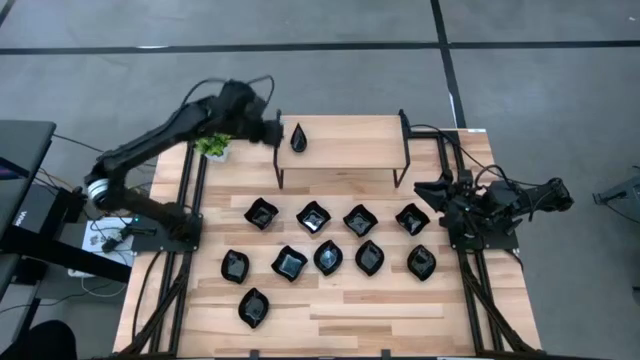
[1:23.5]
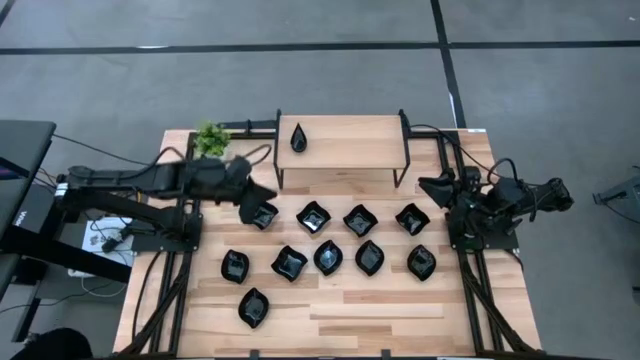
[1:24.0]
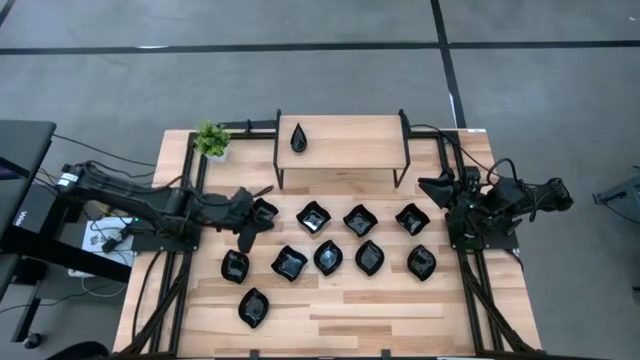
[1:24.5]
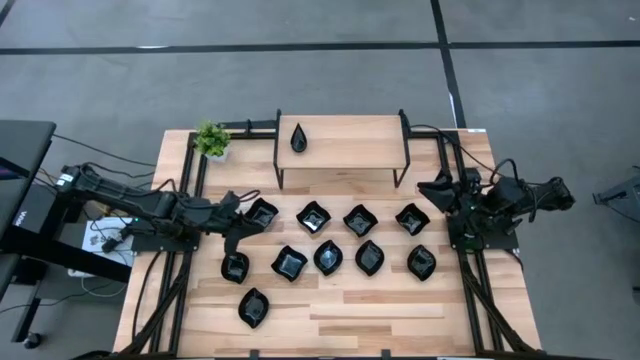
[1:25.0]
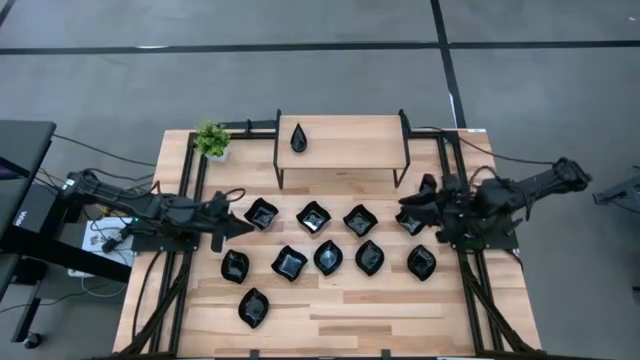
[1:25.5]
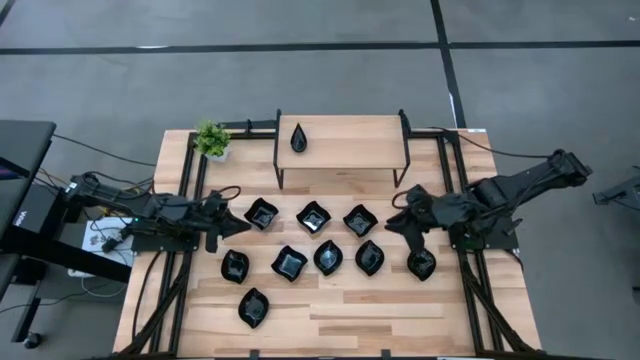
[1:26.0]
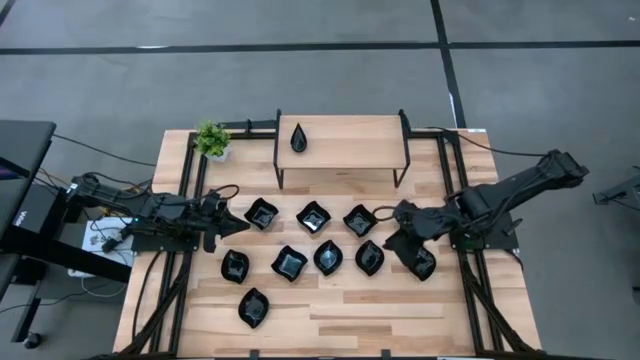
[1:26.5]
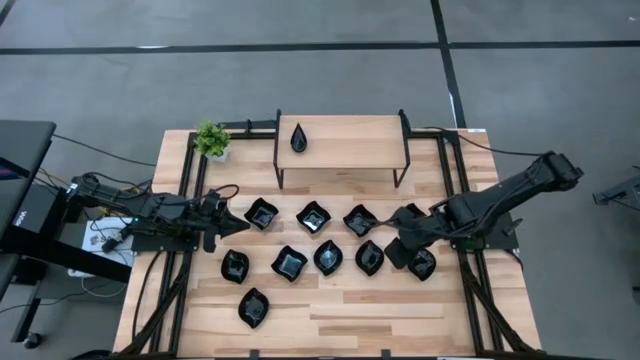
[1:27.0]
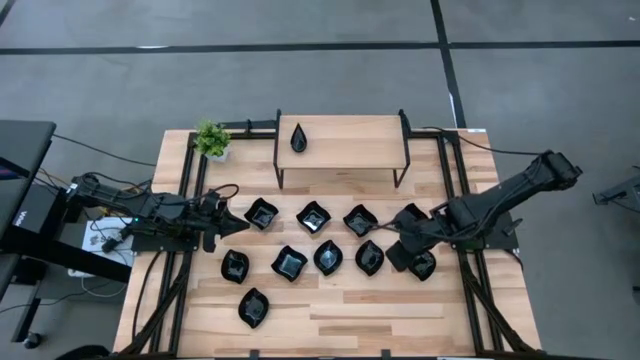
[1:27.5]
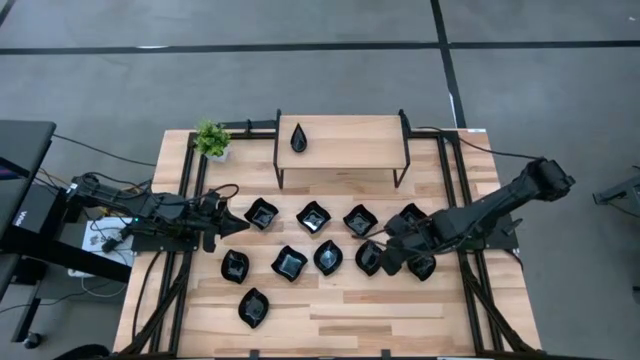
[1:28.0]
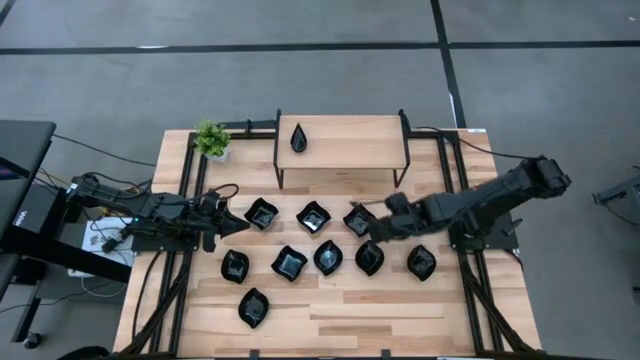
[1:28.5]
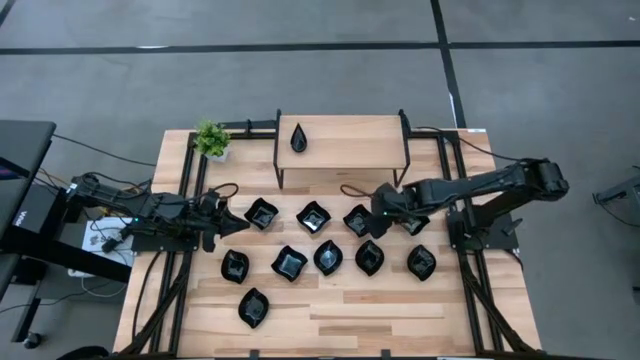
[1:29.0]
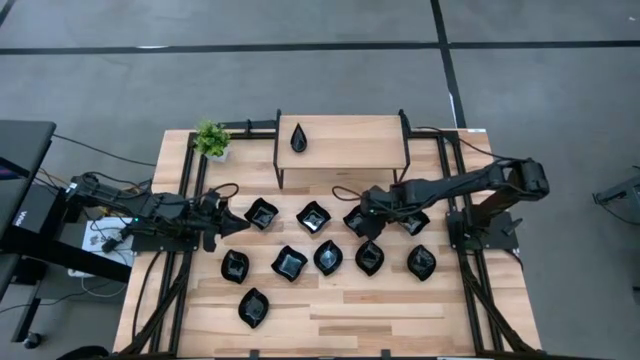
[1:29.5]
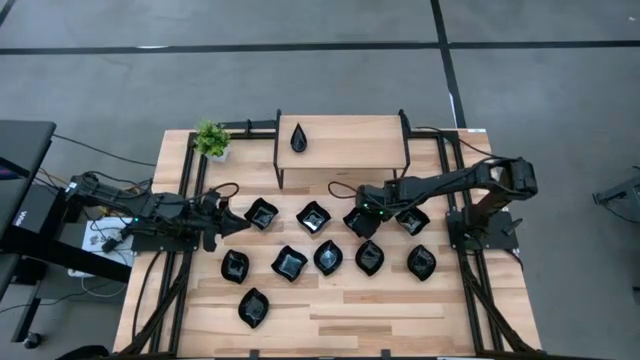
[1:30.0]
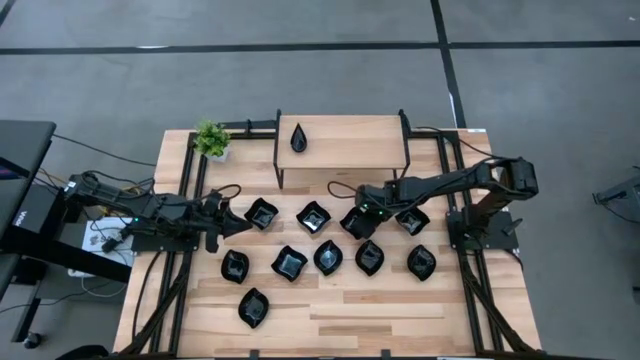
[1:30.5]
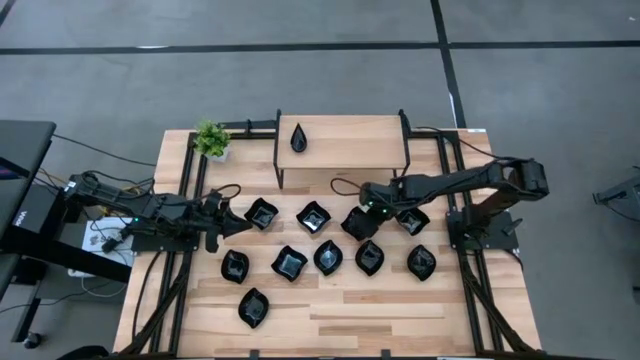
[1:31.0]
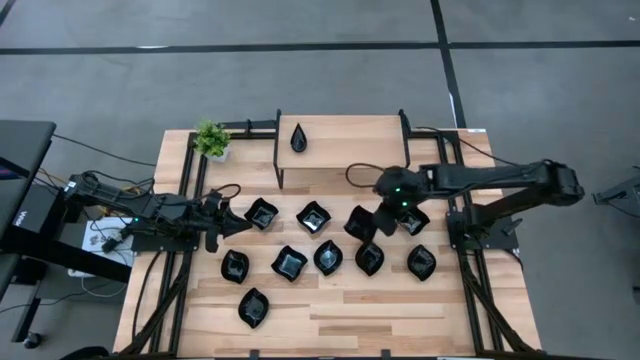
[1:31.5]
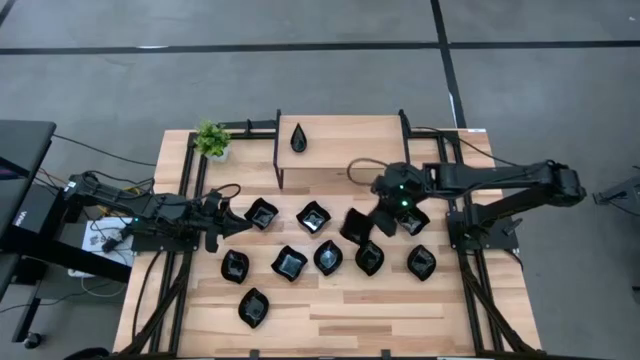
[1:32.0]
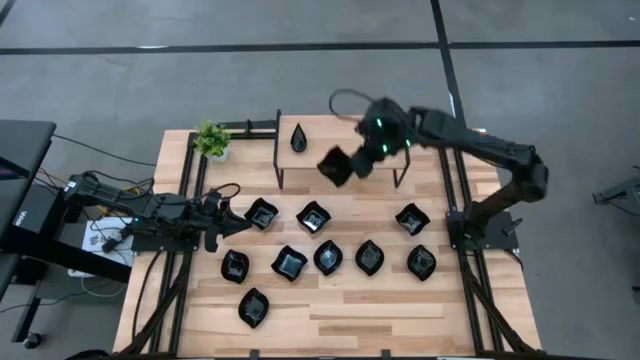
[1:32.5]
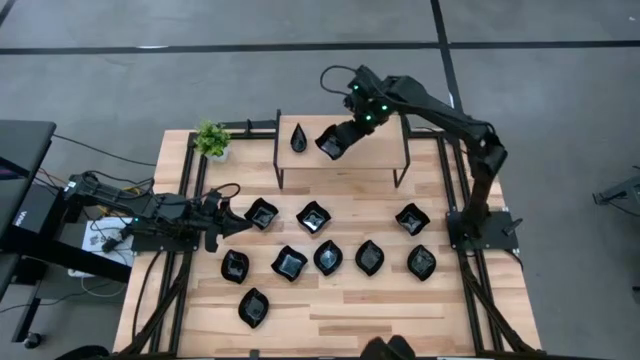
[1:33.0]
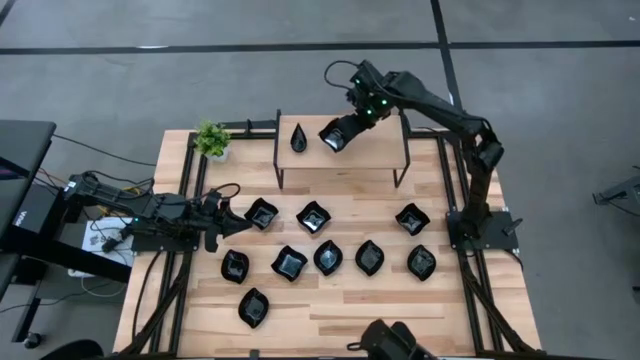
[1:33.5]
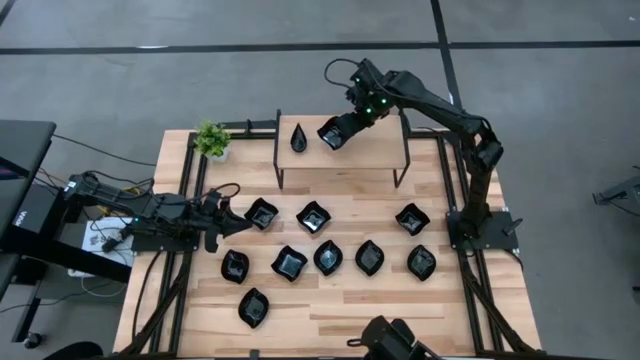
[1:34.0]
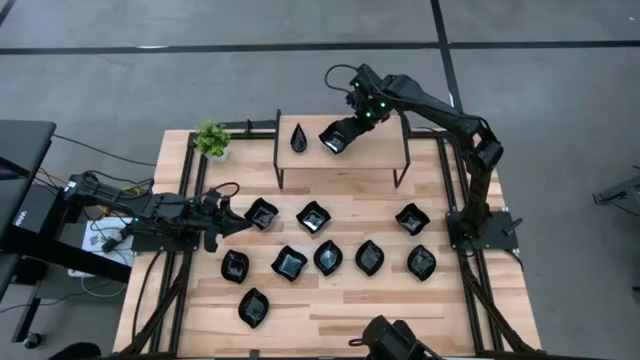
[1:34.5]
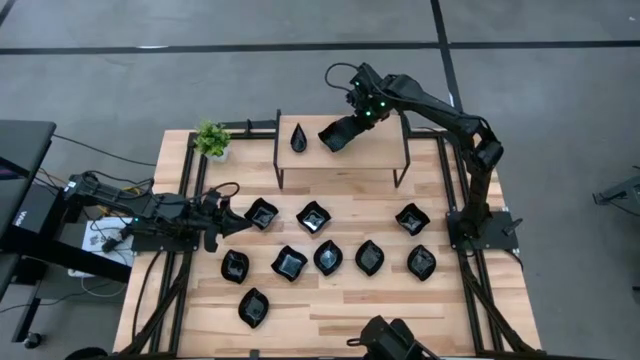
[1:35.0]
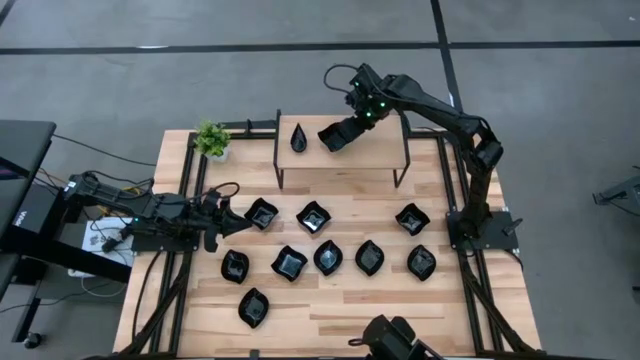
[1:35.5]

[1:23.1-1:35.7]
Task: Pick & Place Mini shaped plates
Put the black distorted square plate on the shelf

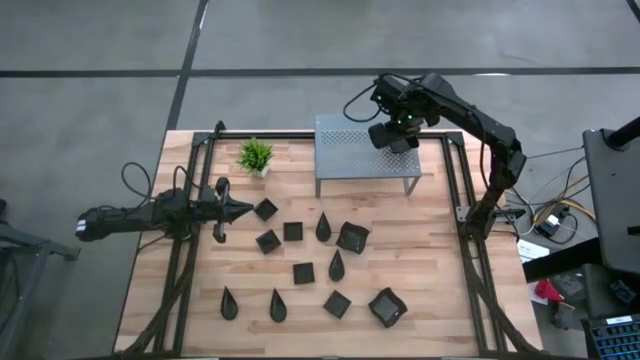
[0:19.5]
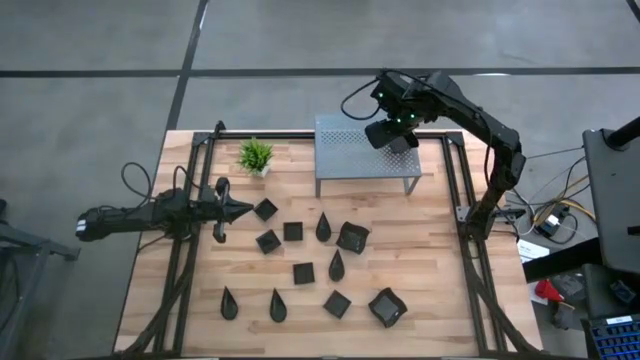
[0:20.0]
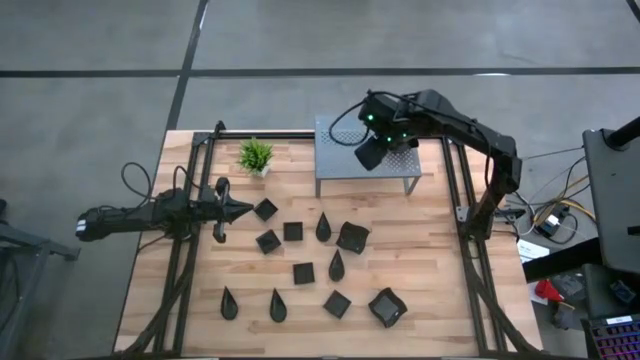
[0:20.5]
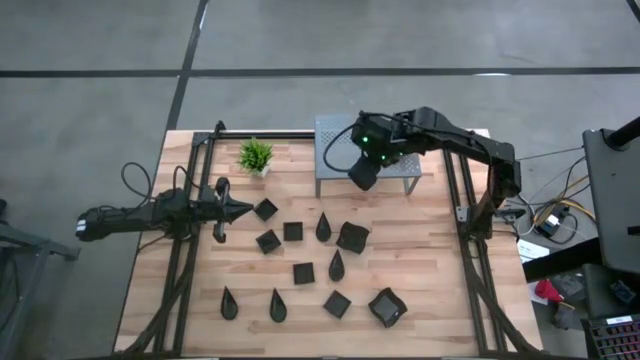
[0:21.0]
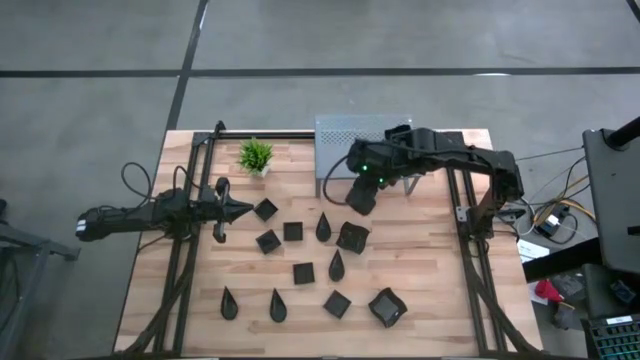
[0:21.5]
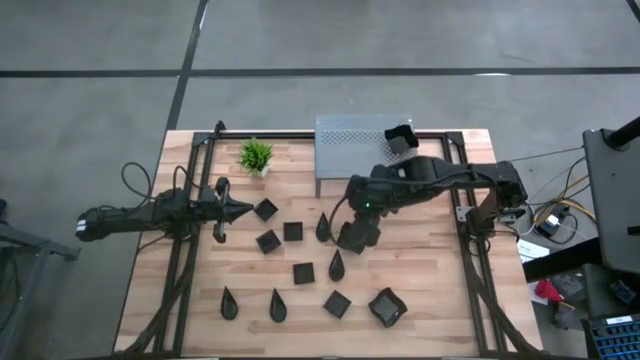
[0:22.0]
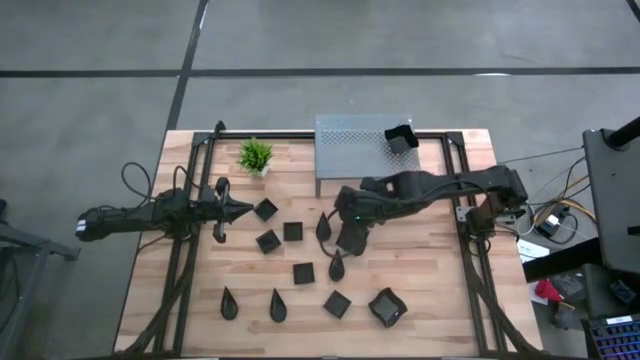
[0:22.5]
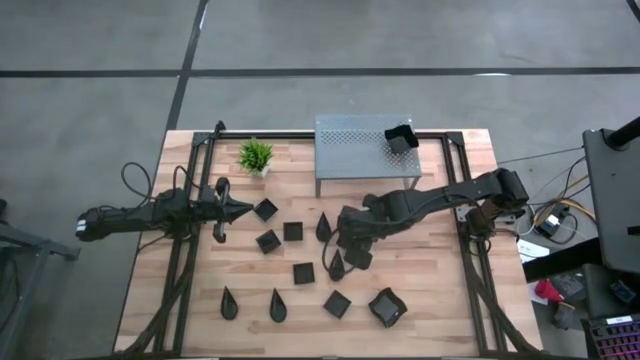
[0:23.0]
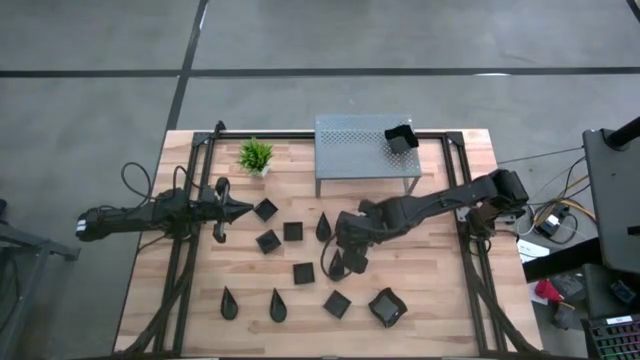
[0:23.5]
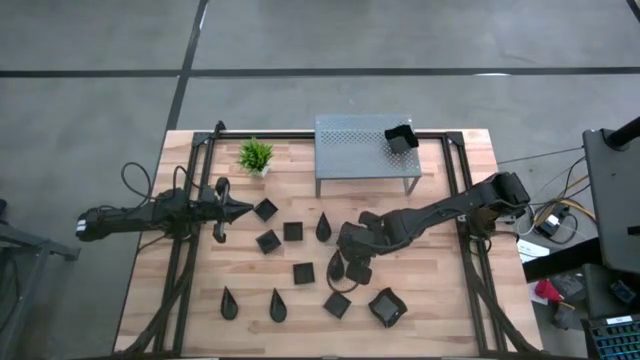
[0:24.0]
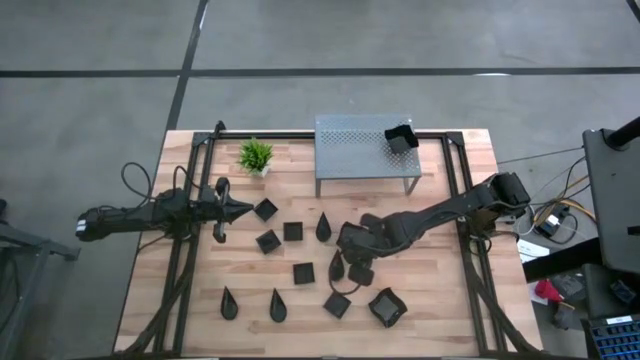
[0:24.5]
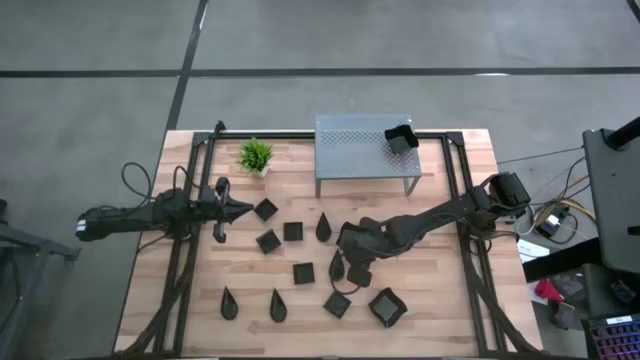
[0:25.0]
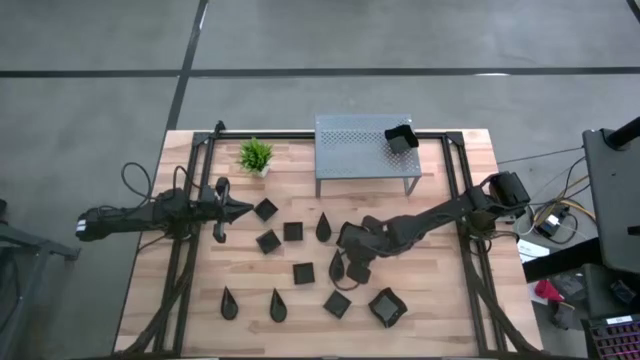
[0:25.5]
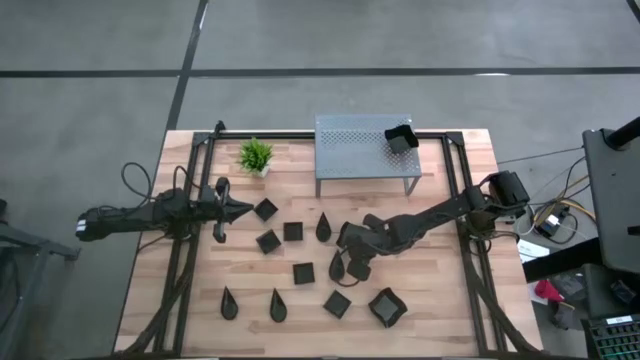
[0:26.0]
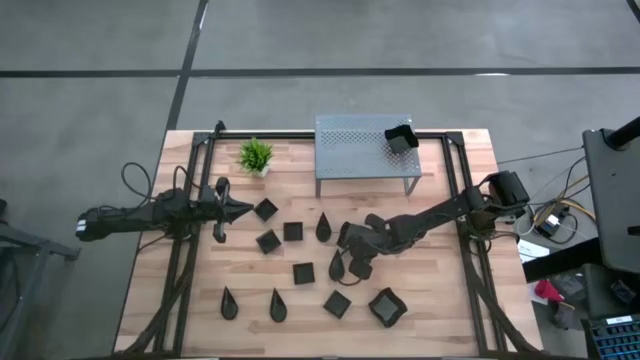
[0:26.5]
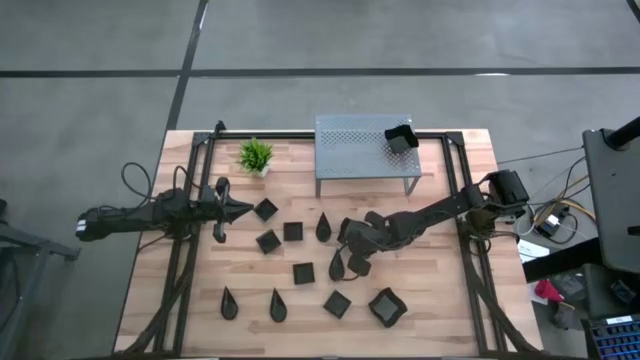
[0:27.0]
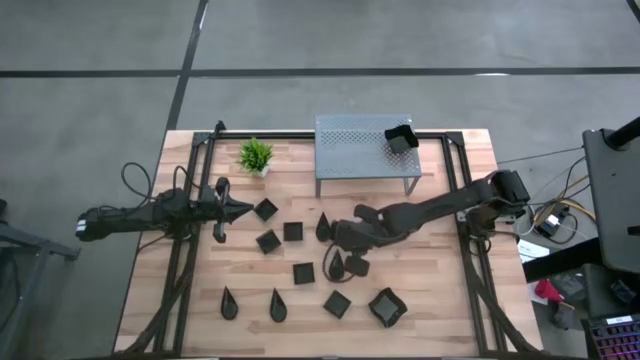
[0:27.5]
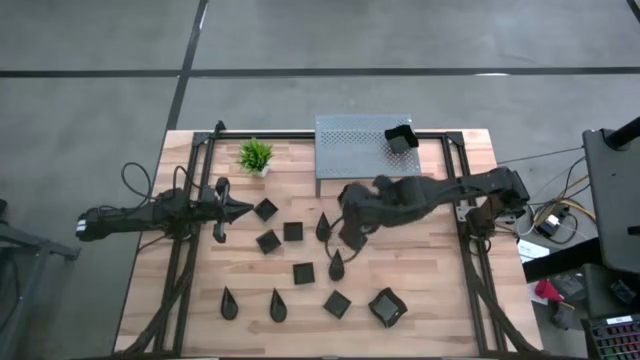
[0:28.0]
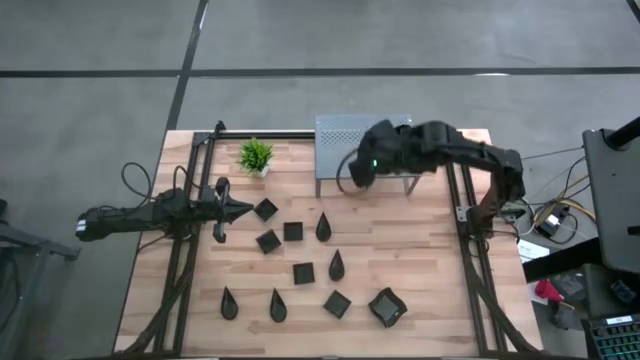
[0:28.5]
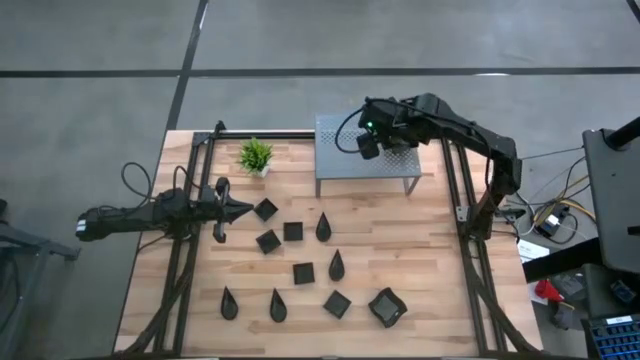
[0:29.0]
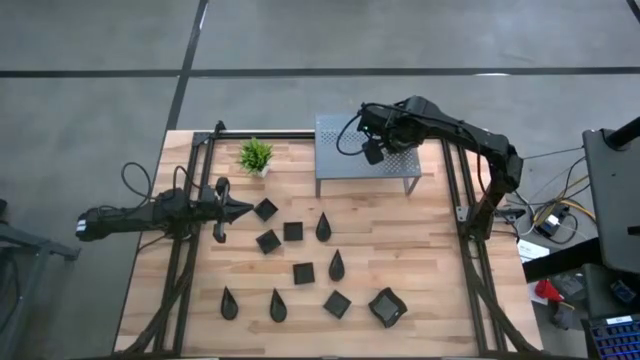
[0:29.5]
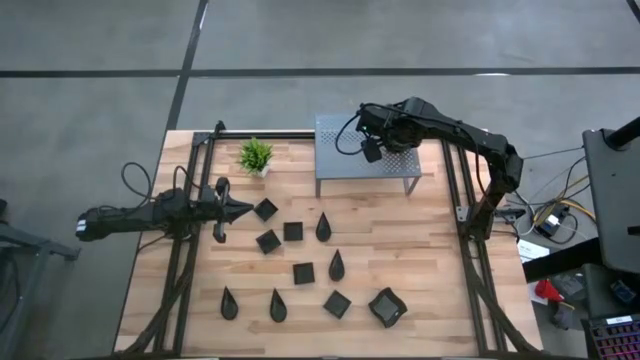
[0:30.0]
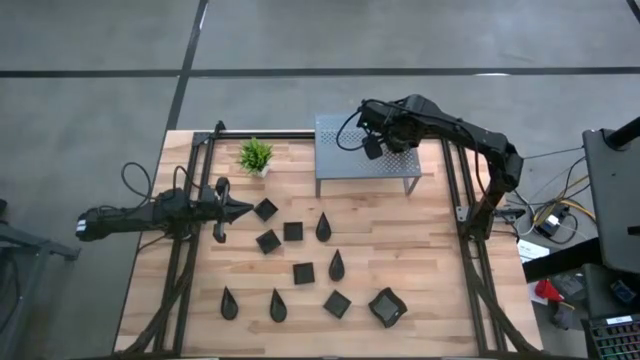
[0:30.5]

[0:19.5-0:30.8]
Task: Pick & Place Mini shaped plates
Stack the black distorted square plate on top of the black distorted square plate on the shelf
